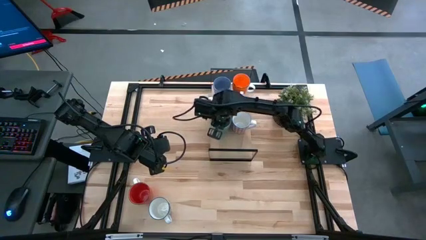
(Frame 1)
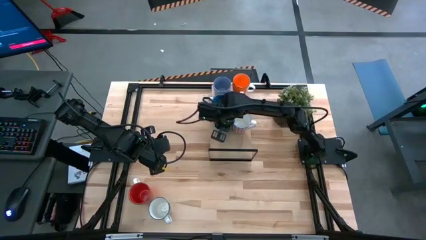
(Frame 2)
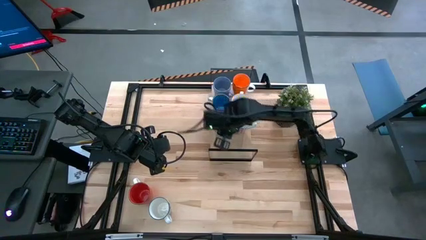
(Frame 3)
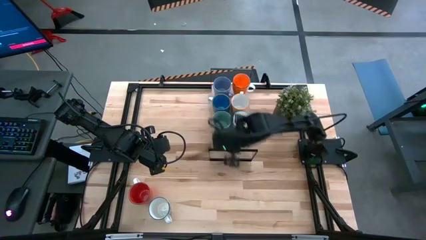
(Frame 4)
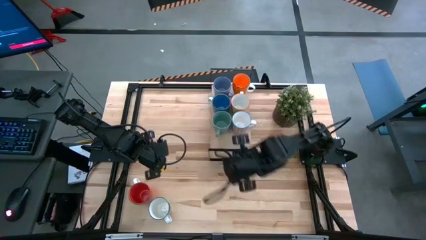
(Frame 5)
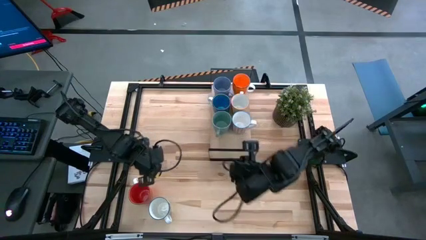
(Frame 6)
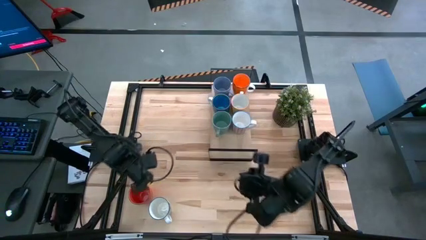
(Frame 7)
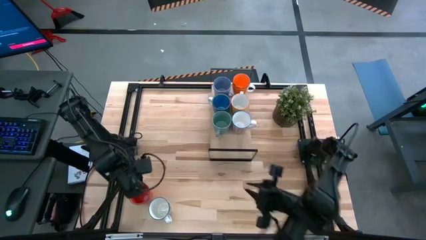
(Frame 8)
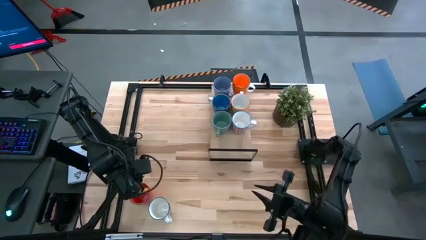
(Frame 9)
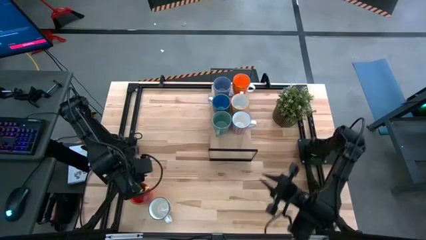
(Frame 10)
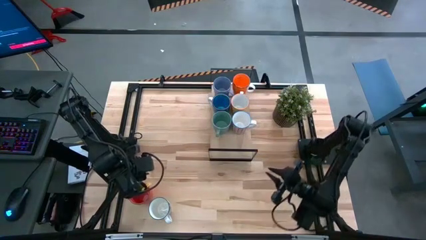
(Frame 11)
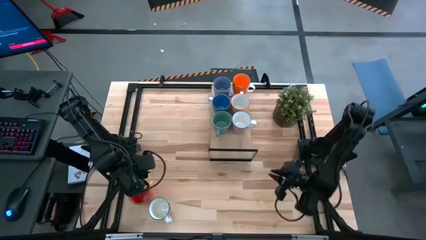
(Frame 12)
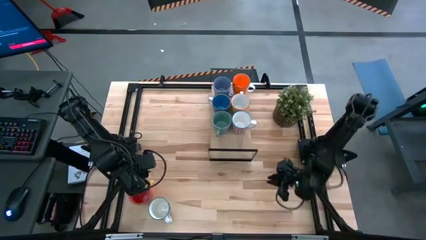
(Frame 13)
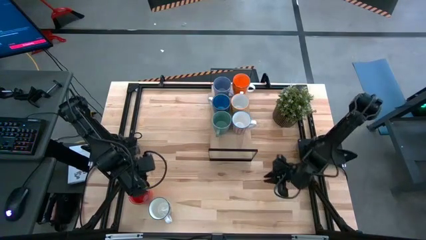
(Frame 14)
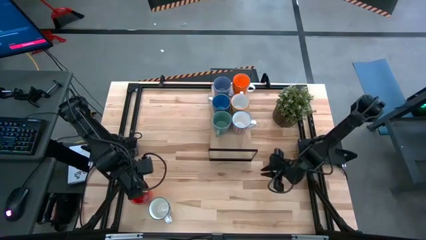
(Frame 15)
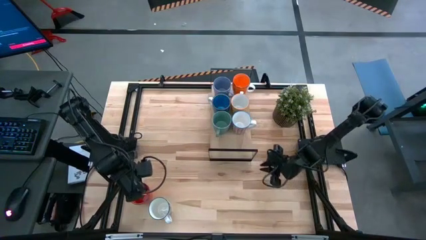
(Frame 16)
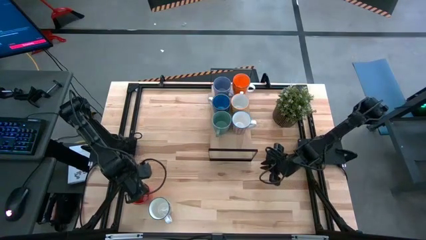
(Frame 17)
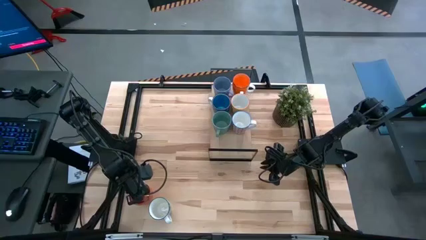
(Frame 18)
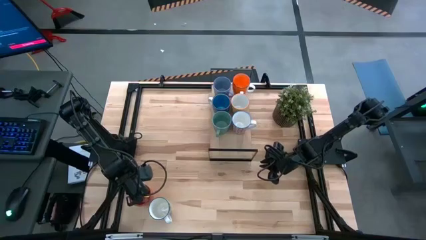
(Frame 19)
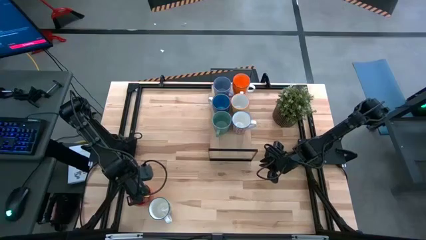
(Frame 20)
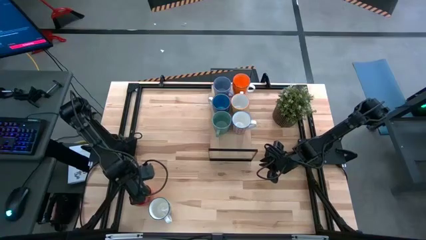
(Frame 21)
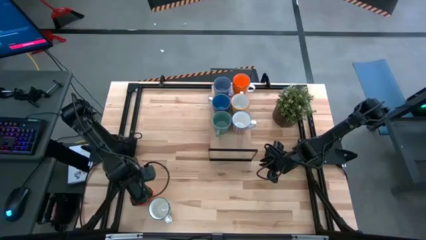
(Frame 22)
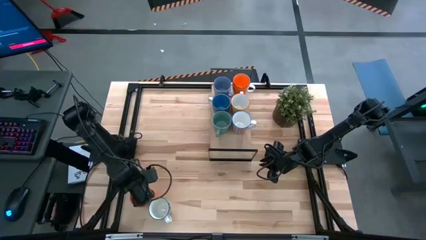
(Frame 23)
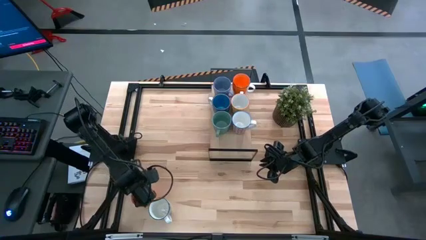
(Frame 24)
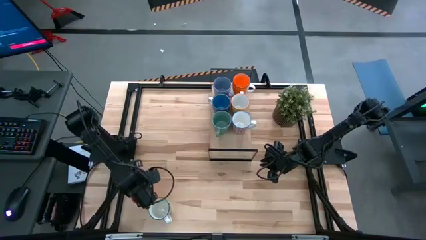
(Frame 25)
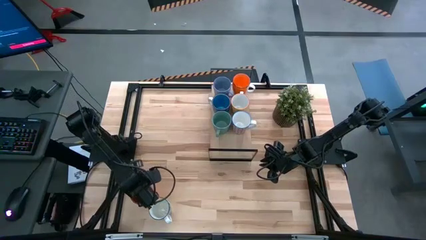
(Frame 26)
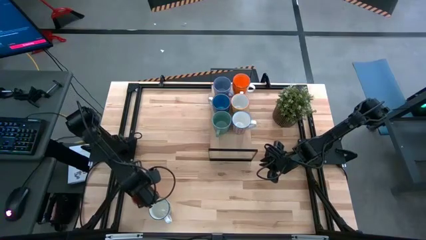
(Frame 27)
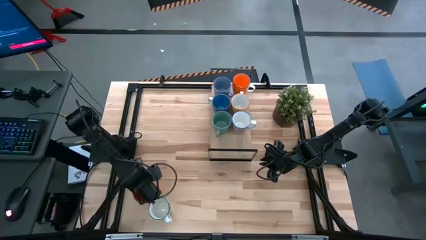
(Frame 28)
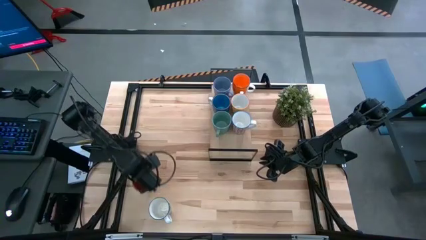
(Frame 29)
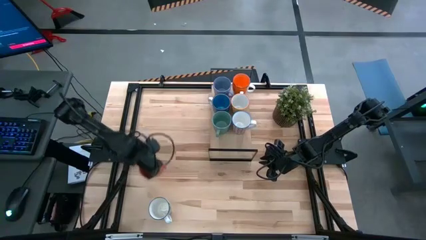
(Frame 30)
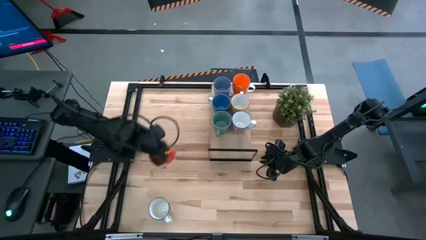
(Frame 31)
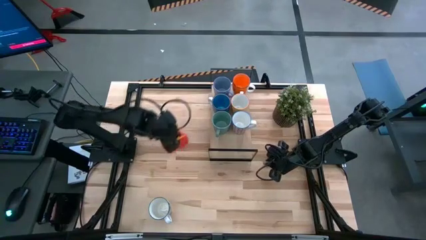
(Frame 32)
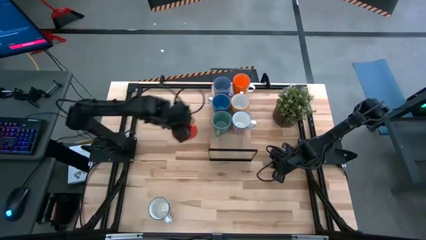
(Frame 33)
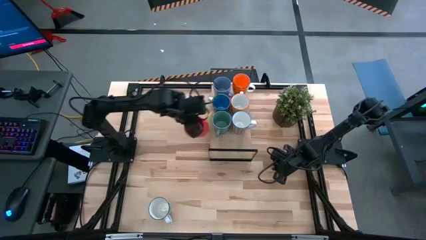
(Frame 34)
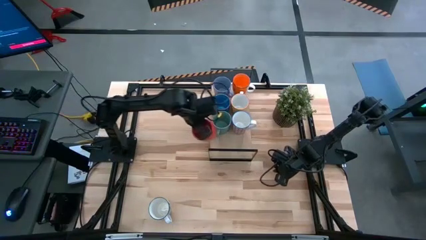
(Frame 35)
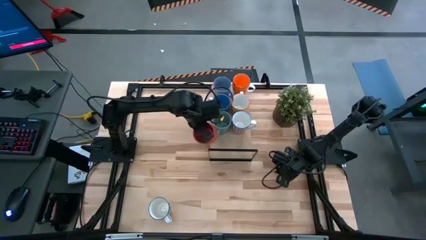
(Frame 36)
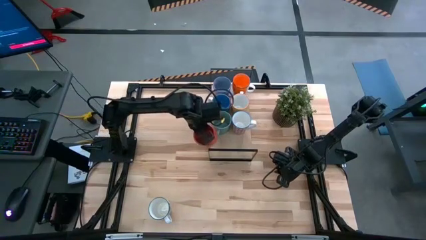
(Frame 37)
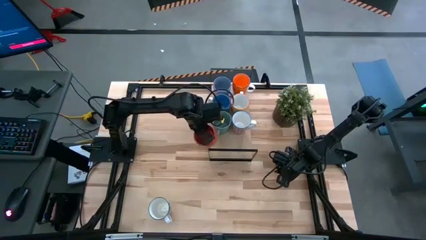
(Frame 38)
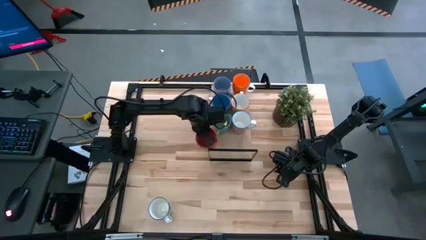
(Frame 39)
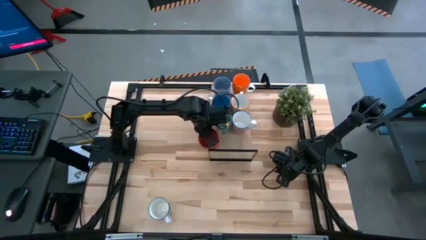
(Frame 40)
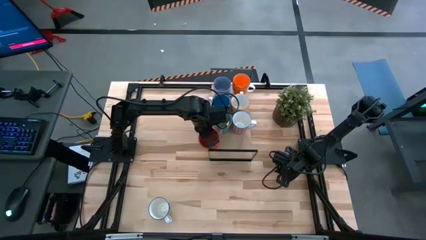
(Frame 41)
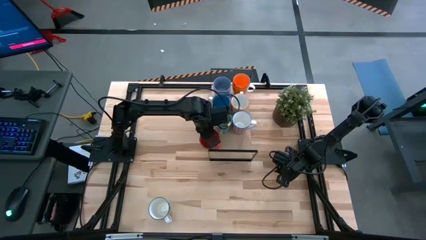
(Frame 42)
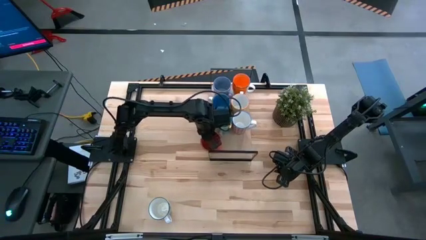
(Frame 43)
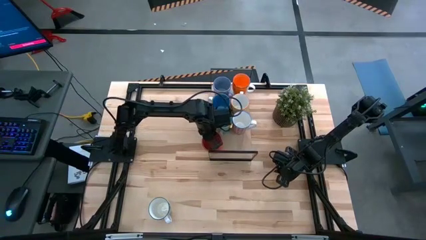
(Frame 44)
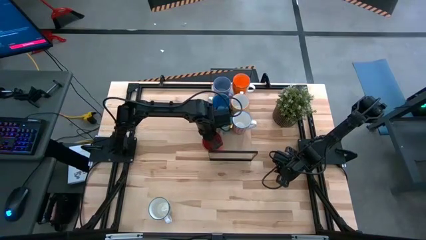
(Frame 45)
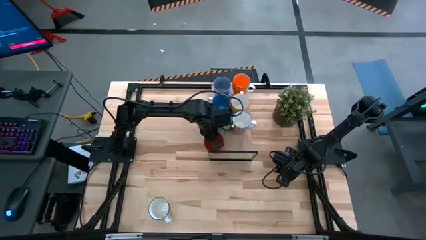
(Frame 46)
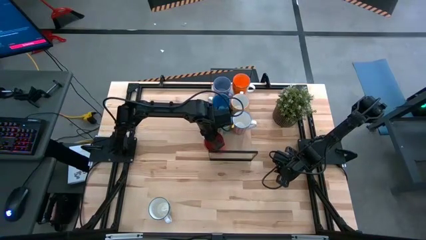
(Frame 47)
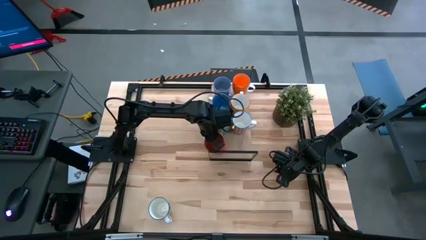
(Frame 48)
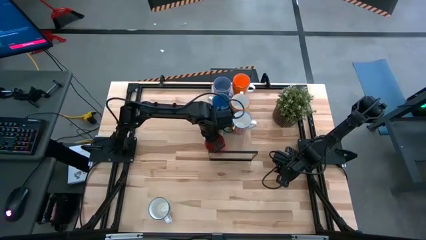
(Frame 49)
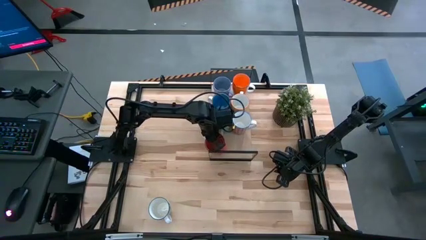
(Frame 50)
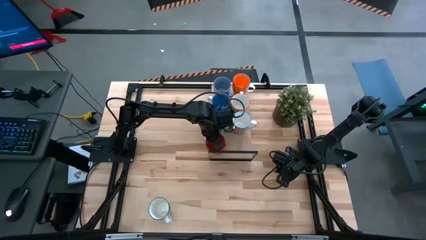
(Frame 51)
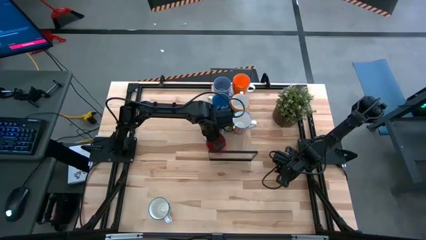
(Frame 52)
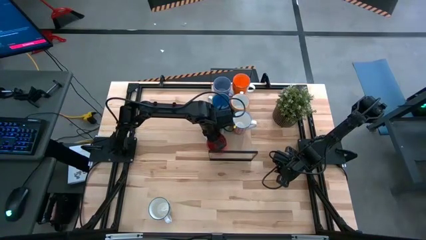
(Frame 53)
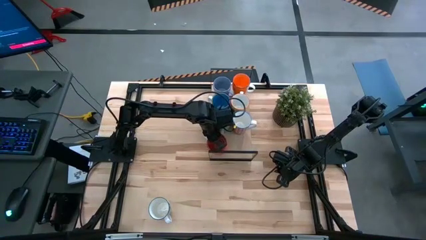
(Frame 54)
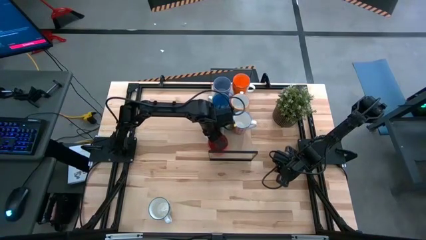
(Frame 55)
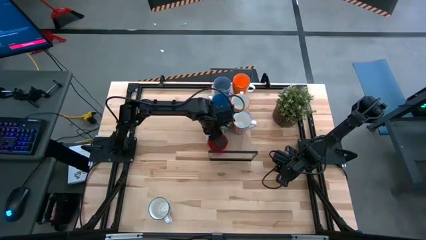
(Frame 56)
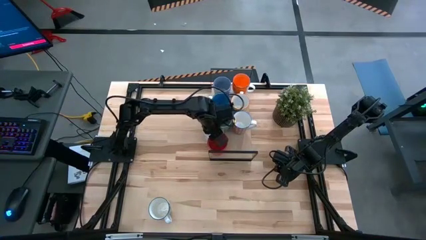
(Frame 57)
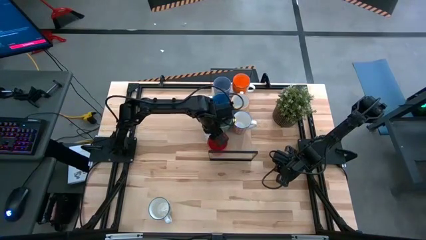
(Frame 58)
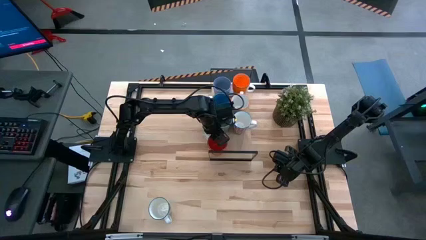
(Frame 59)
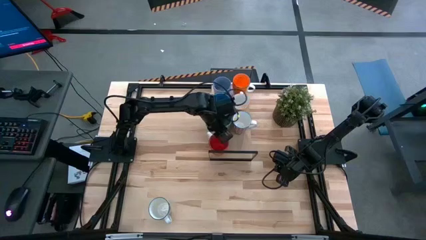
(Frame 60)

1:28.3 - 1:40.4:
Task: Place coffee mugs
Put the red mug on the shelf next to the green mug

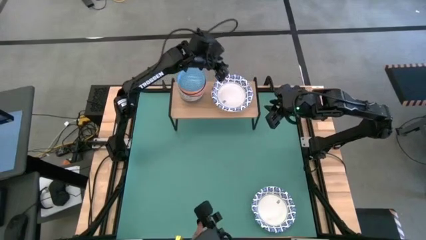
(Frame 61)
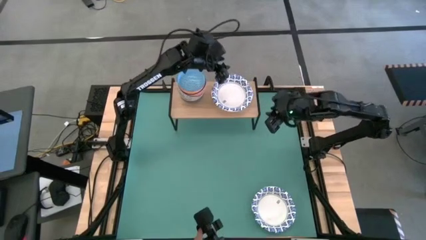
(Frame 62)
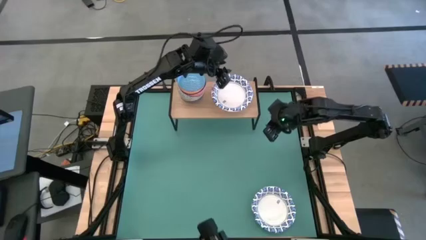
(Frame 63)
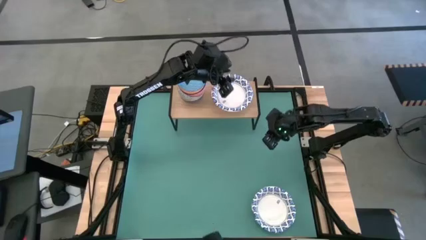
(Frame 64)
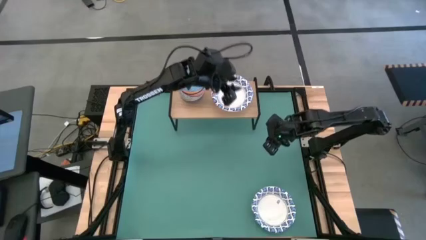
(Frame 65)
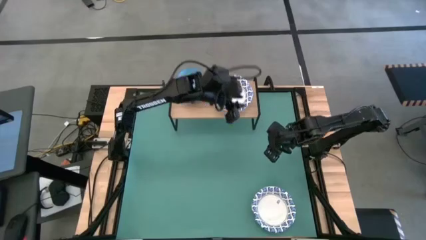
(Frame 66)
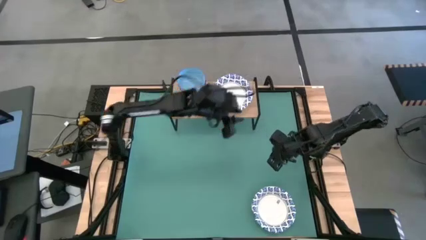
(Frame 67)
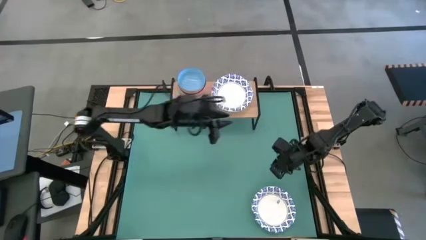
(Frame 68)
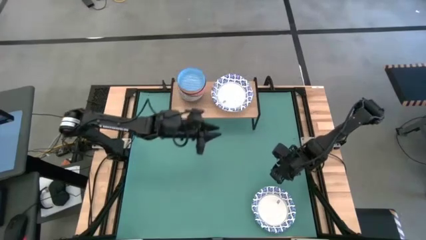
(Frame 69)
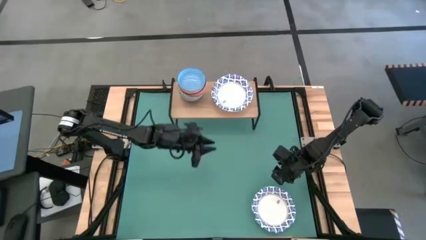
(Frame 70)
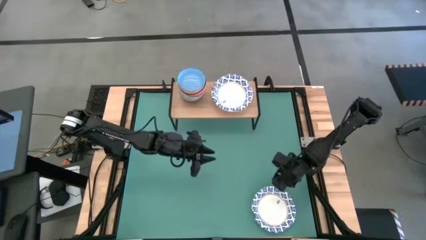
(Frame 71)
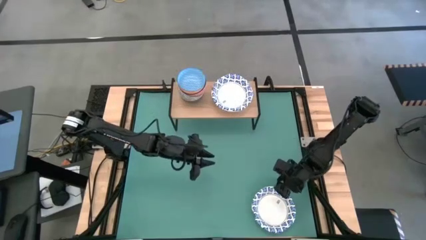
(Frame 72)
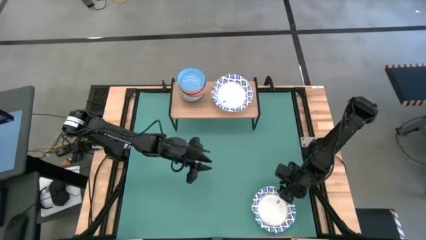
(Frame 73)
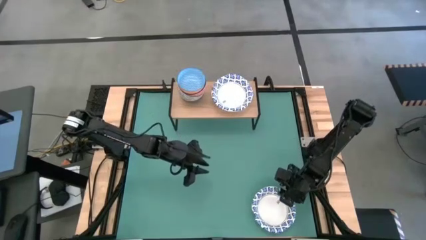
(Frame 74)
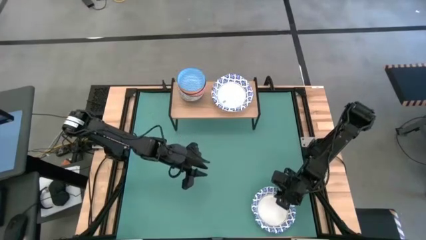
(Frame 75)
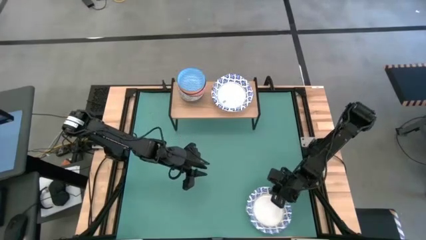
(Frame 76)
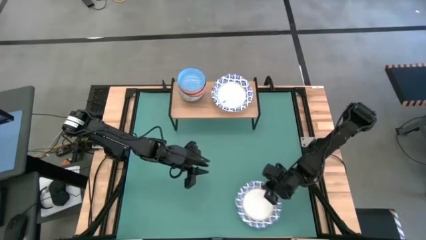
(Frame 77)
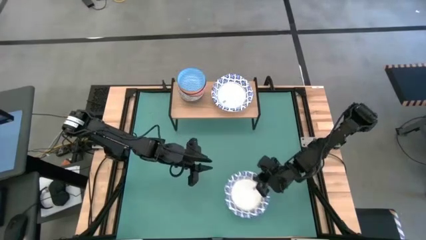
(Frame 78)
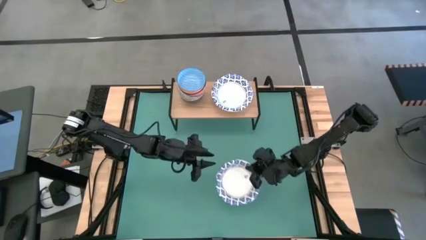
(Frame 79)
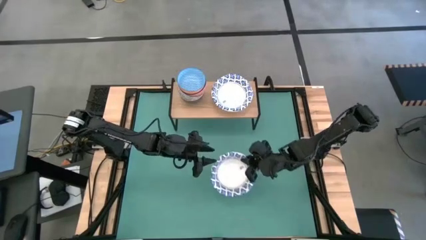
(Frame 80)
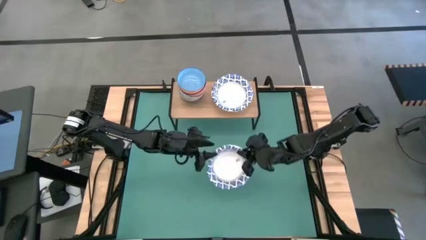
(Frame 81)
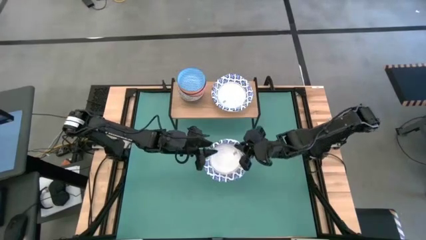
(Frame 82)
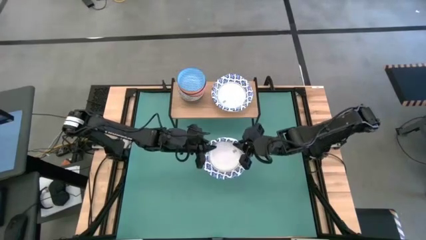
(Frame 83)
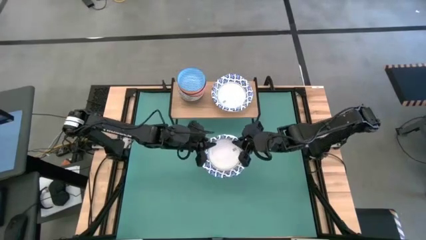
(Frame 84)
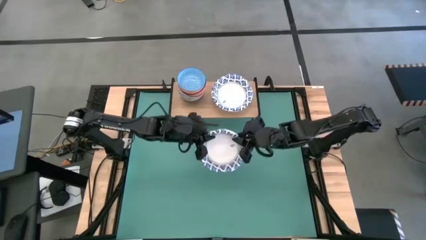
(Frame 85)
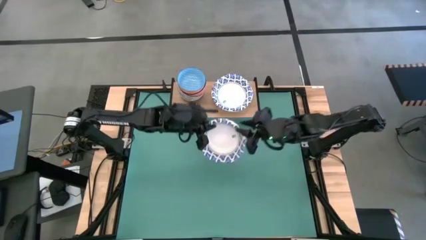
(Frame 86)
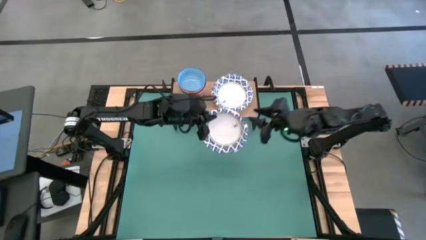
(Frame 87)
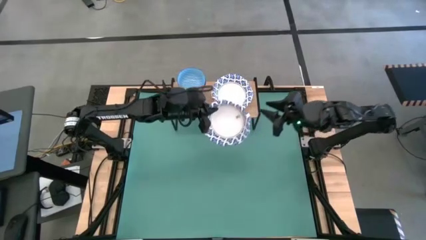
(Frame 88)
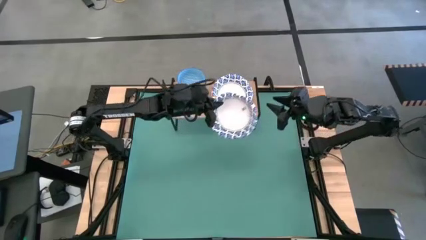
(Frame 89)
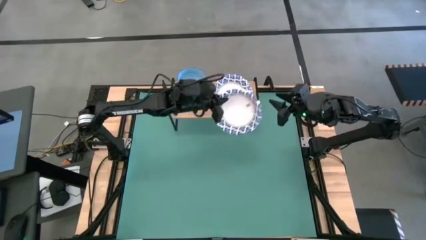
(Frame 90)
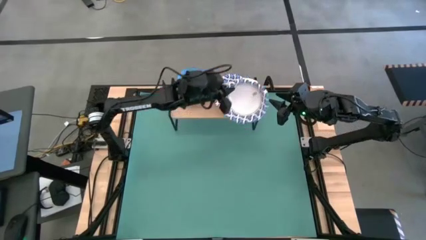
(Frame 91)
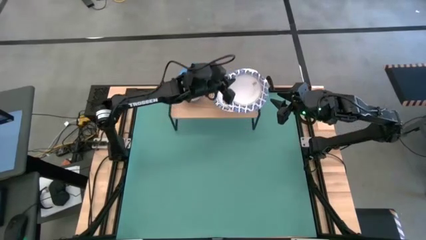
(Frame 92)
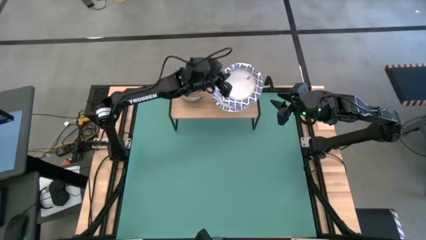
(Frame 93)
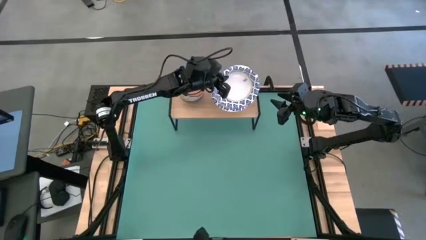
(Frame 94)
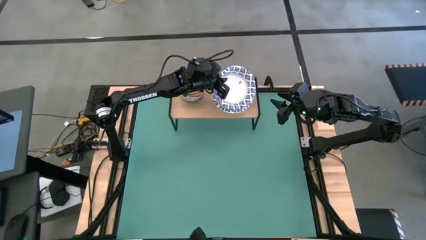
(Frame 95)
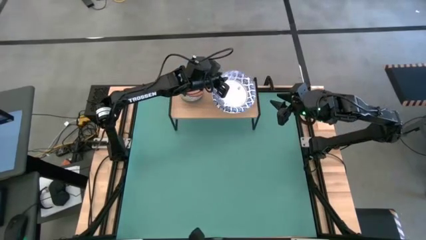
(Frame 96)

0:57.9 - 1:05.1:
Task: Place and stack bowls onto a shelf
Stack the white bowl on top of the white bowl on the shelf
